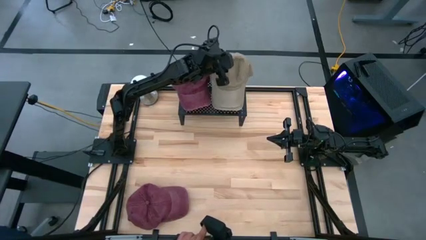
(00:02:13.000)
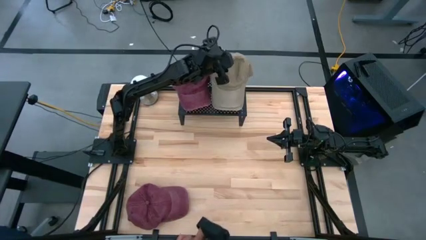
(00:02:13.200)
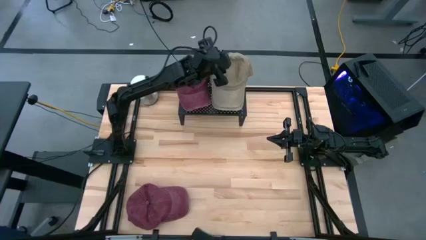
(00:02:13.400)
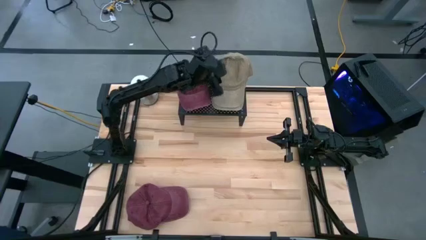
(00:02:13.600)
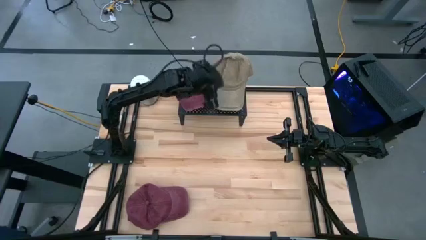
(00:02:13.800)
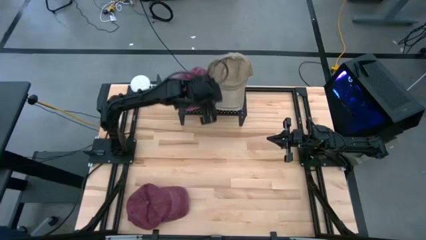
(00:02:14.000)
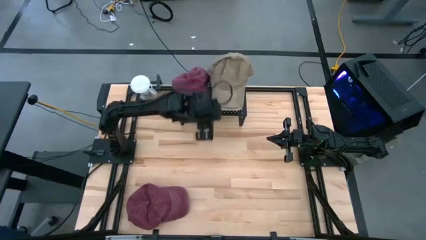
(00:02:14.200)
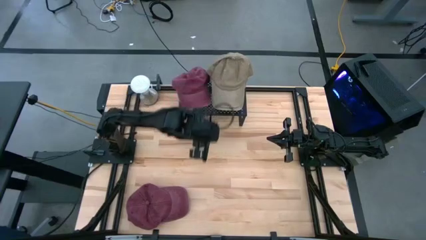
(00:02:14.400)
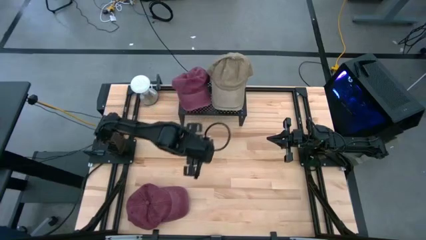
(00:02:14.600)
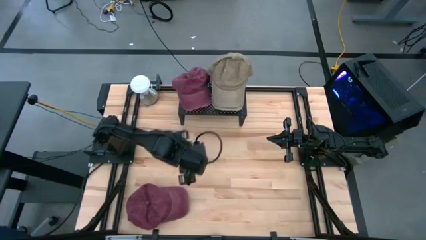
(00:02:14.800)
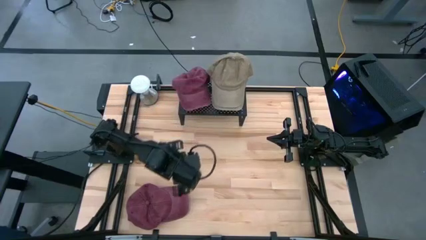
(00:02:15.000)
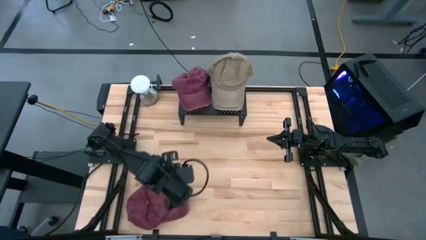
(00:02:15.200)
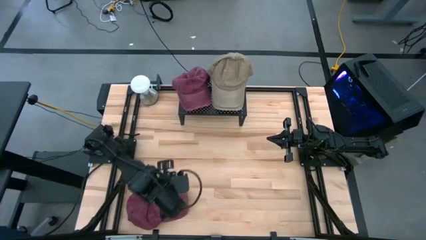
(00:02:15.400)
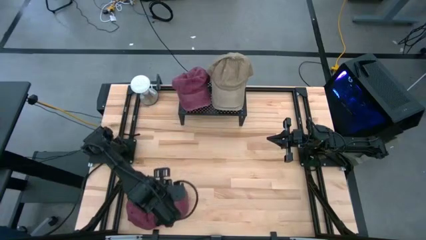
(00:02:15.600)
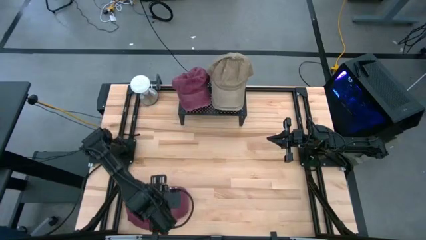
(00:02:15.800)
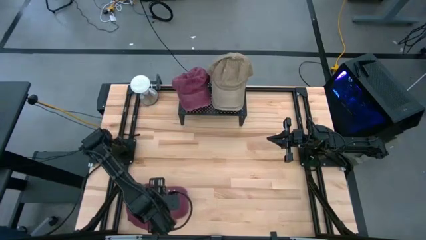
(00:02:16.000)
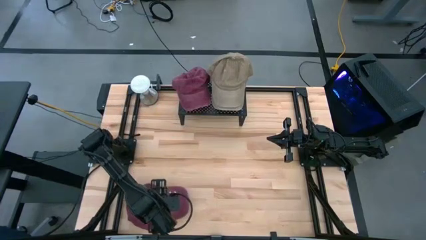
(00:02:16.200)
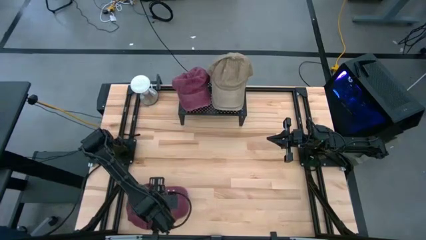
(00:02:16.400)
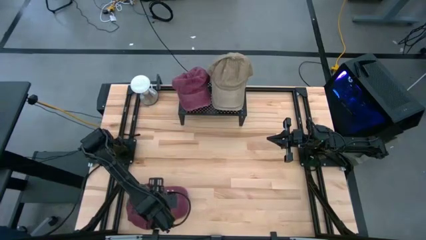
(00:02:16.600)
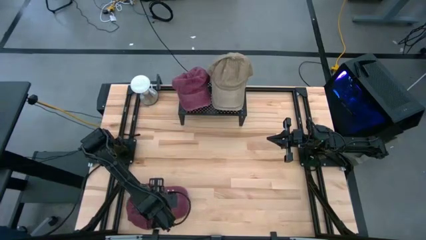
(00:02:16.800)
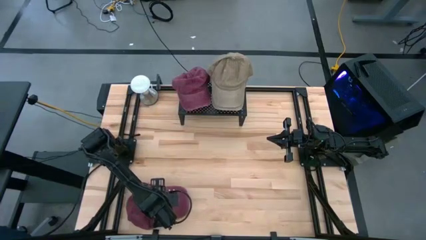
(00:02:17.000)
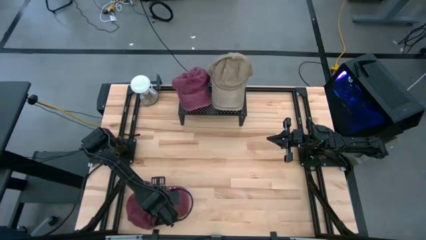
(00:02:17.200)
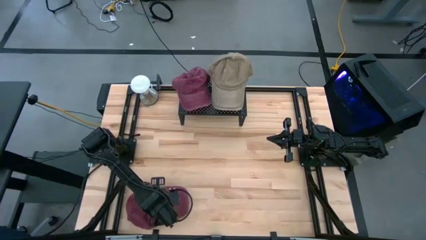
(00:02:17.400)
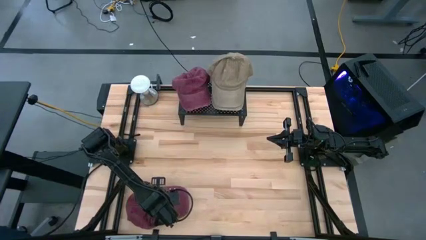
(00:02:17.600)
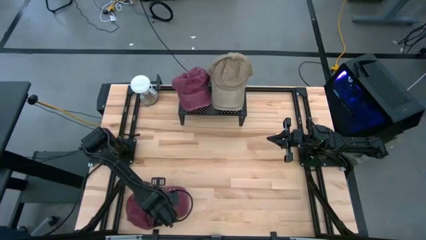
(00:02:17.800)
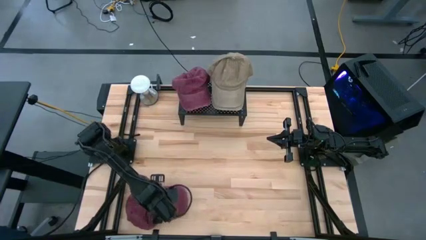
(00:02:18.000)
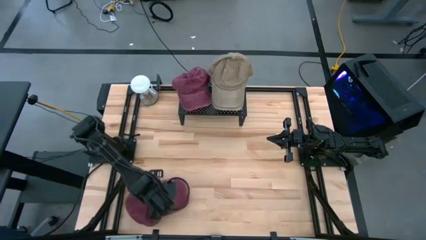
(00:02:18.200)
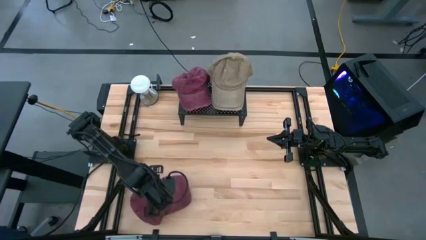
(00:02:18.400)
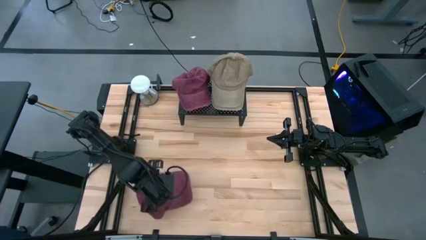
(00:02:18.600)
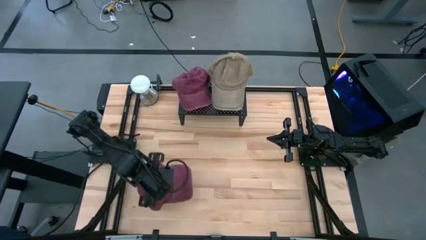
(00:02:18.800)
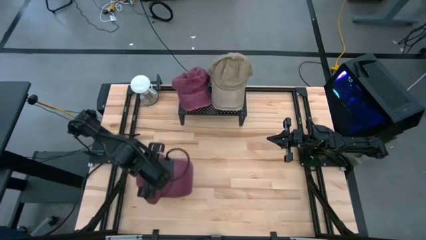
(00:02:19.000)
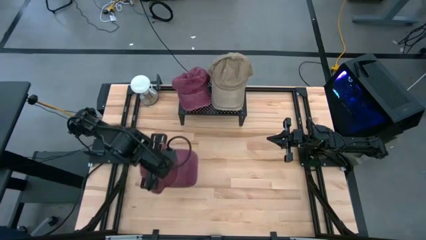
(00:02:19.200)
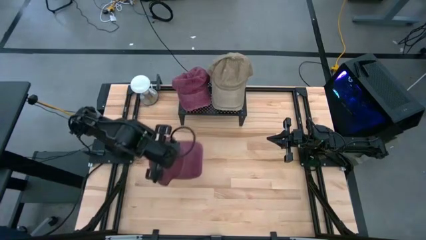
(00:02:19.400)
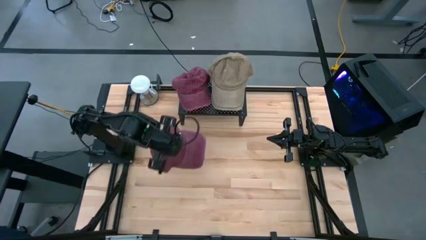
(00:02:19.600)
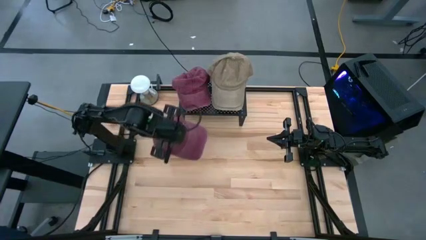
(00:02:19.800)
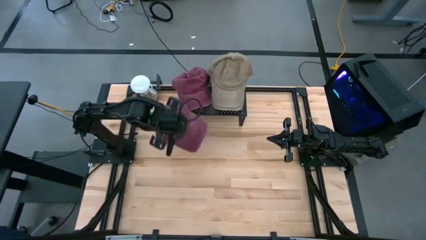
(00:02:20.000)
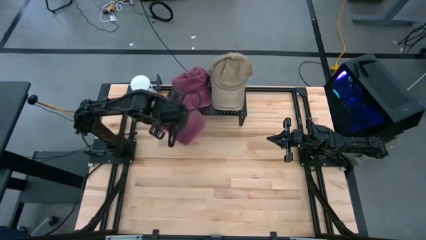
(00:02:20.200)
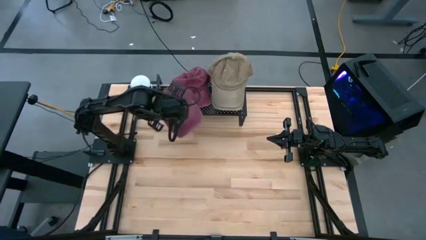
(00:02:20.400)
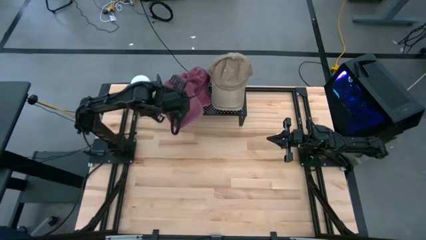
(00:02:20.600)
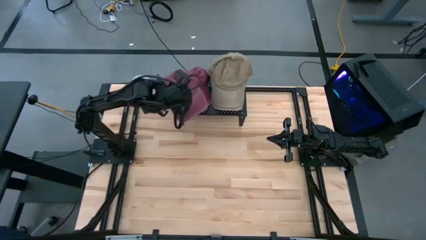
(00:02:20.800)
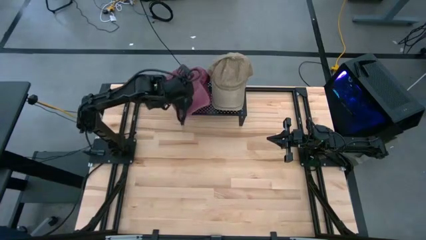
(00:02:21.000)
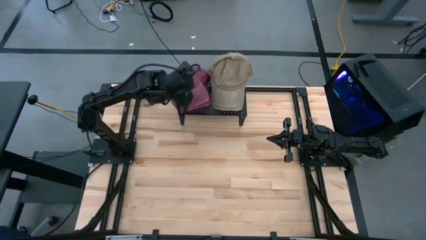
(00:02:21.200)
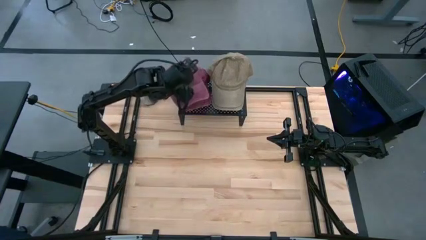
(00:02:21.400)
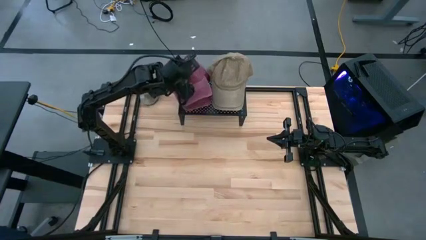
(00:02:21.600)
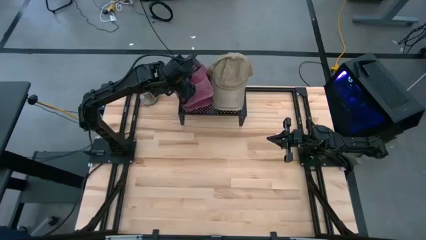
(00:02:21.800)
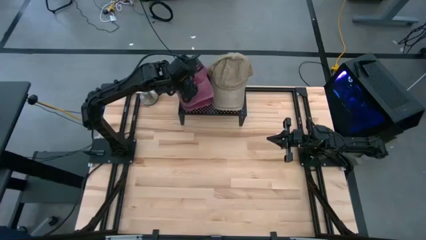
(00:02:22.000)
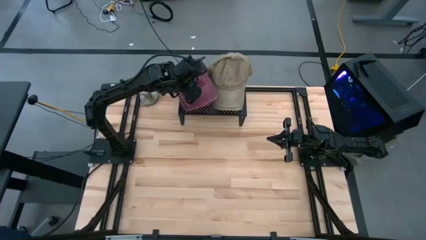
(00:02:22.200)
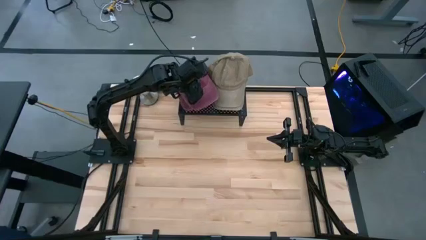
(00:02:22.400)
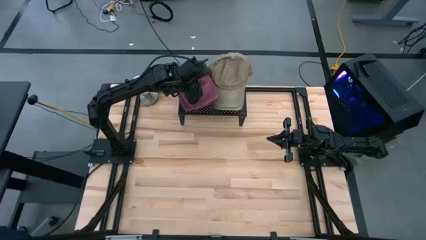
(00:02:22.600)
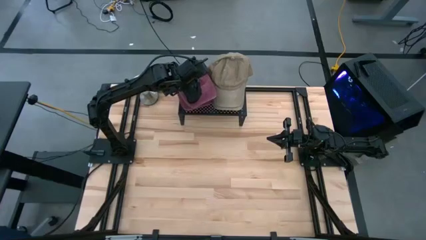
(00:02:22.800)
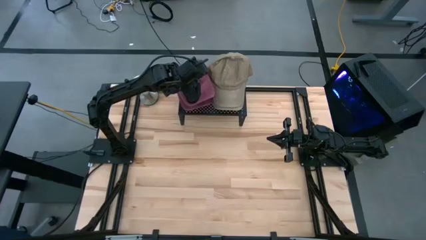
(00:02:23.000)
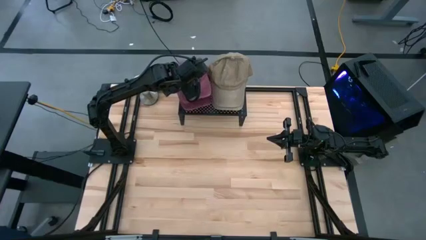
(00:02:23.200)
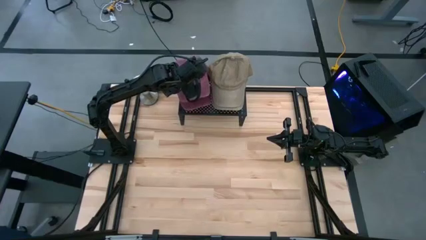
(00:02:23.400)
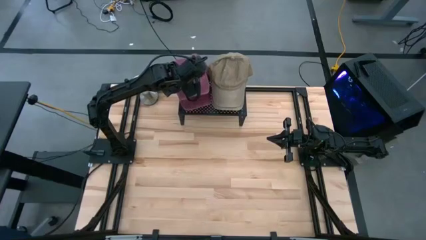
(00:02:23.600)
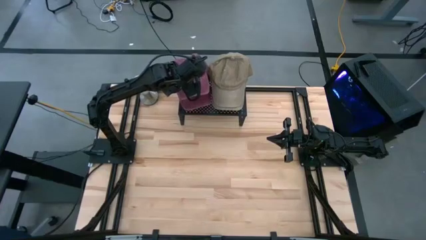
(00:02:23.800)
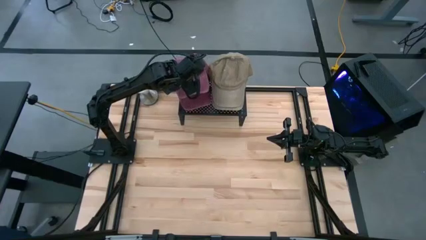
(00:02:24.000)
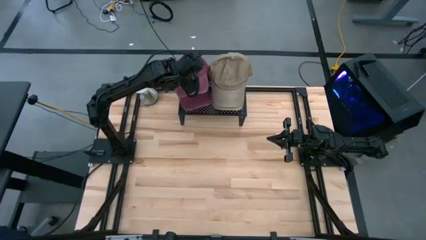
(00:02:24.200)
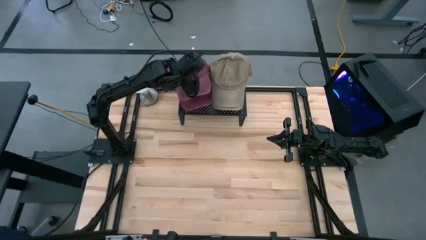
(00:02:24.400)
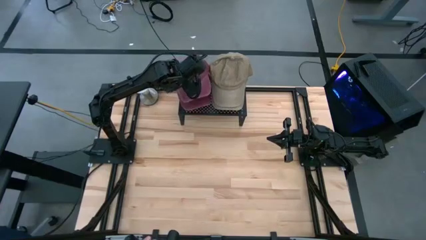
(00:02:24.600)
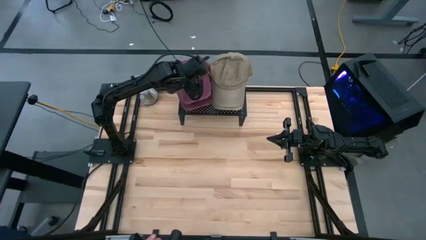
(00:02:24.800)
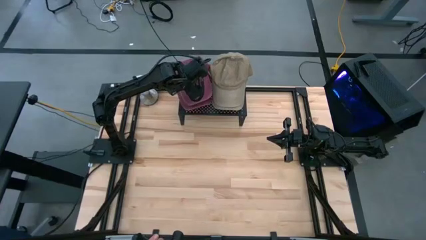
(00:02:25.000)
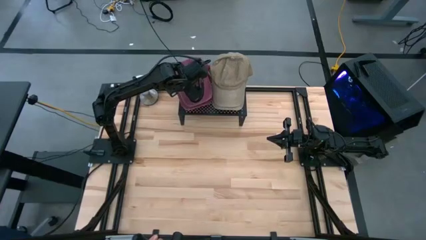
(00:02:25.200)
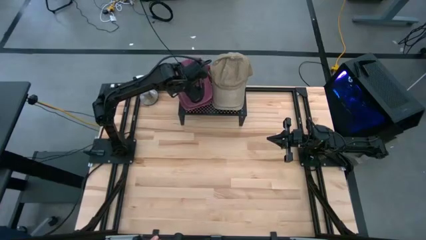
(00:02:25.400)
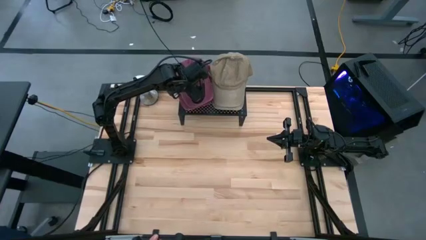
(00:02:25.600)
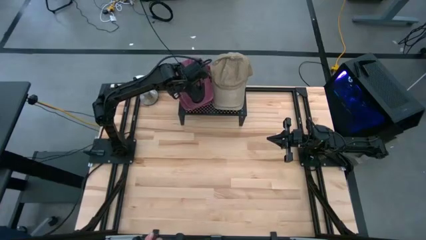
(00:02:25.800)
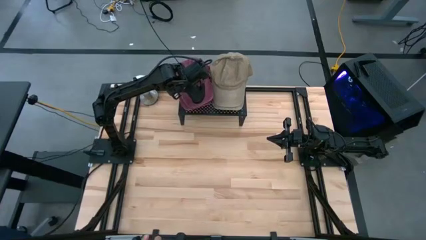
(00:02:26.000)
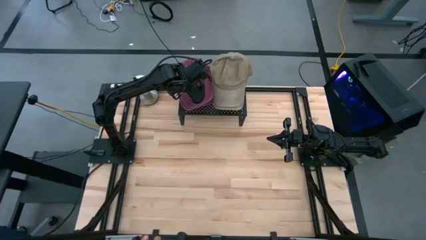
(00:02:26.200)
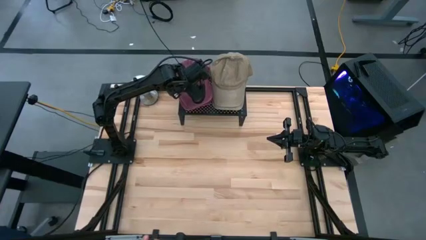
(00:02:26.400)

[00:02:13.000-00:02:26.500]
Task: Pick & Place hat
Stack the red cap on the red cap on the shelf

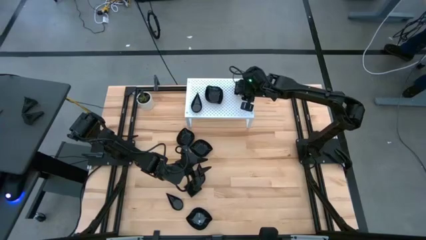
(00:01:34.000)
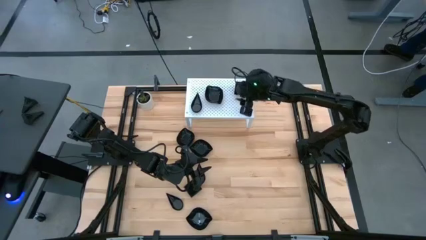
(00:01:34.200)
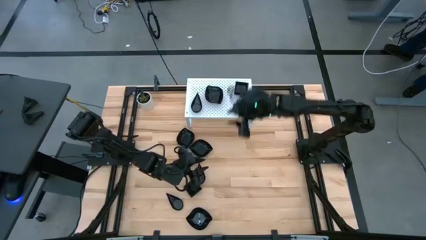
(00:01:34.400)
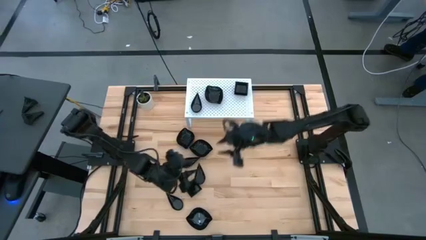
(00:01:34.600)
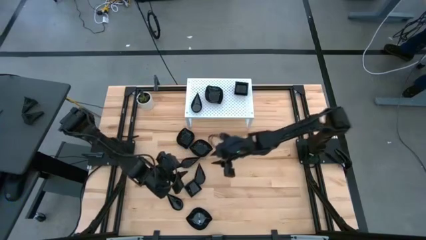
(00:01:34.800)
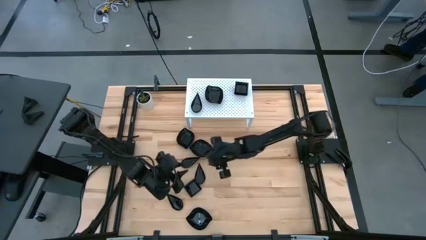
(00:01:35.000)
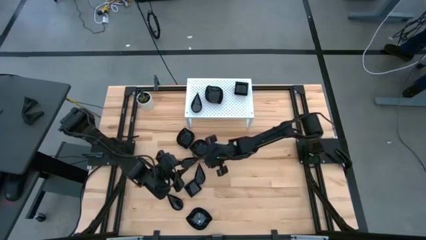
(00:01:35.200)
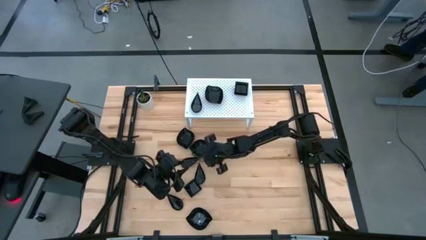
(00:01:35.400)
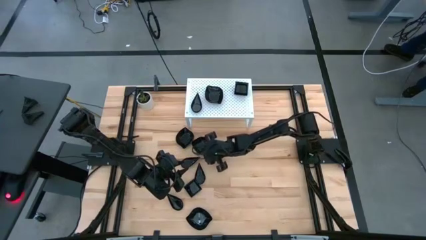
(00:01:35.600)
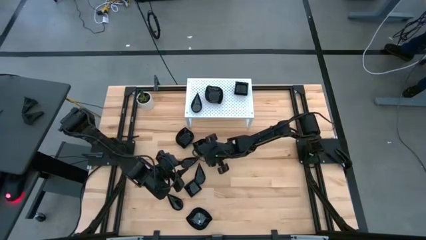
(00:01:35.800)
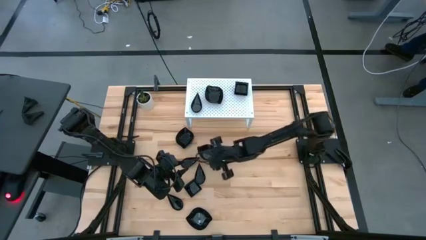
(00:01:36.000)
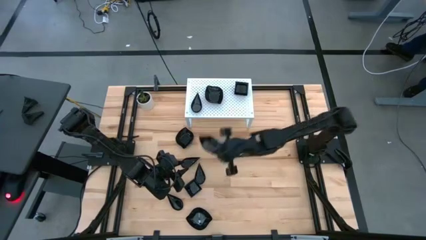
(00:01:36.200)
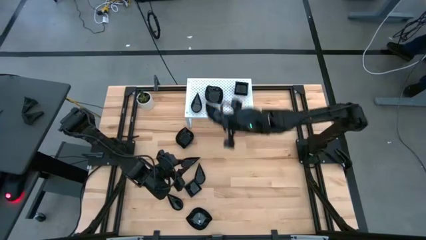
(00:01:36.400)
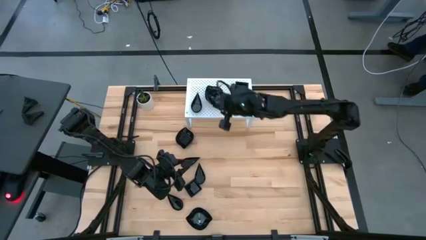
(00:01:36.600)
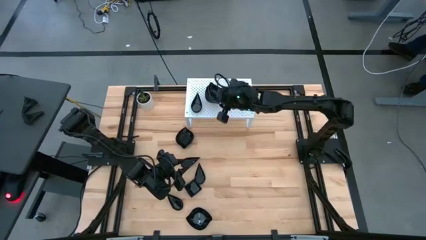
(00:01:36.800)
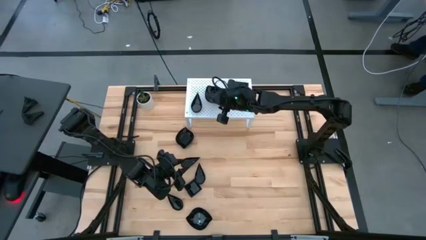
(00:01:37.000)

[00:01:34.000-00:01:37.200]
Task: Pick & Place Mini shaped plates
Stack the black leaf-shaped plate on top of the other black leaf-shaped plate on the shelf
